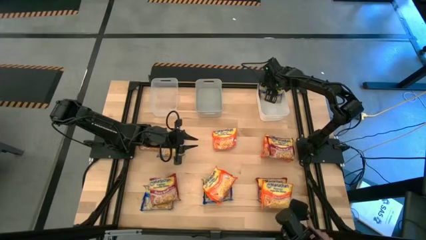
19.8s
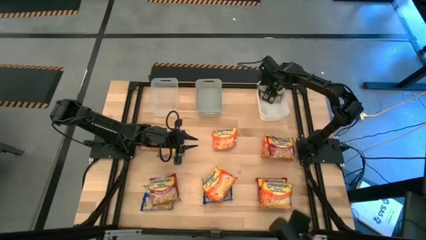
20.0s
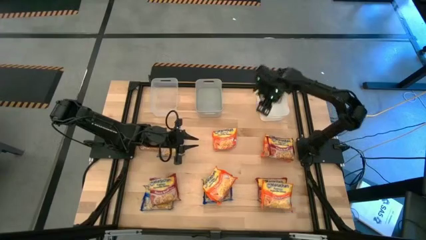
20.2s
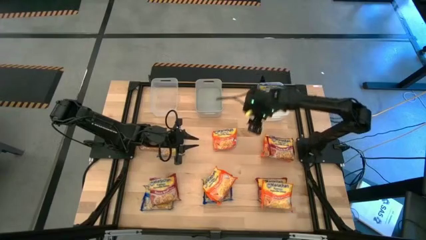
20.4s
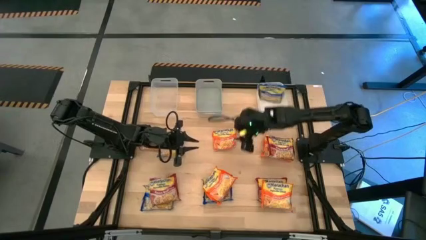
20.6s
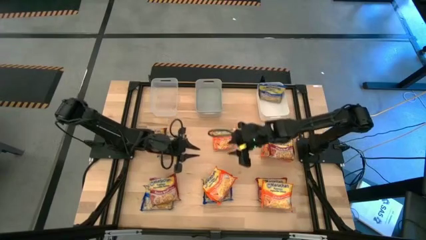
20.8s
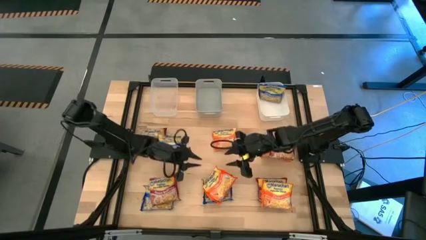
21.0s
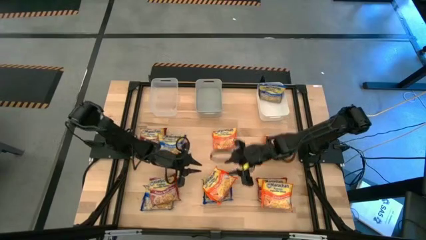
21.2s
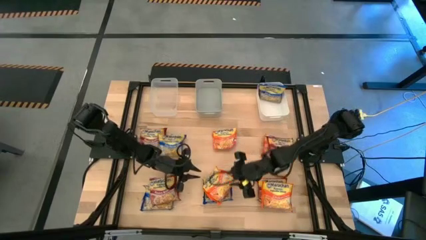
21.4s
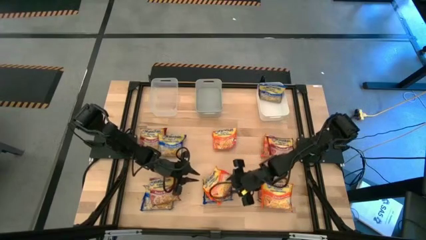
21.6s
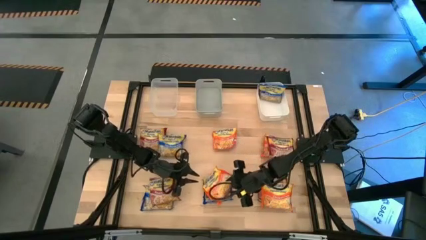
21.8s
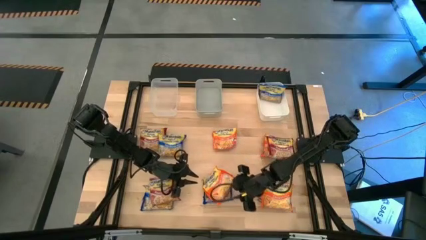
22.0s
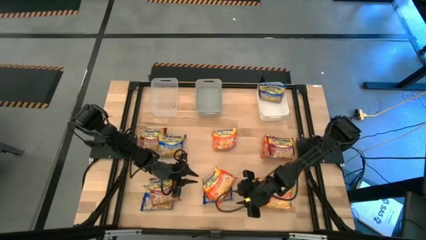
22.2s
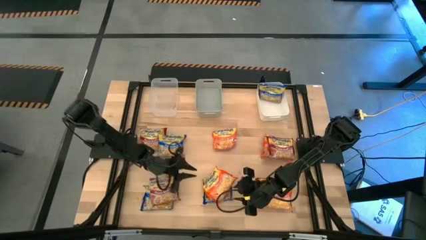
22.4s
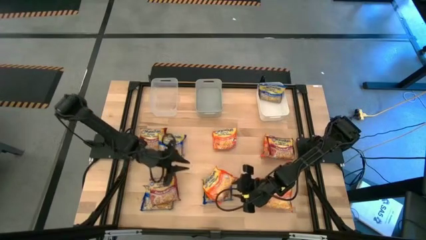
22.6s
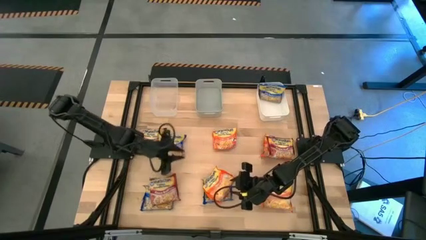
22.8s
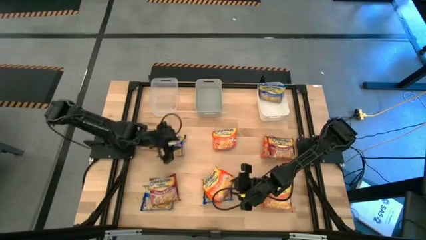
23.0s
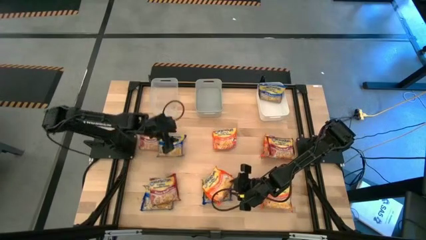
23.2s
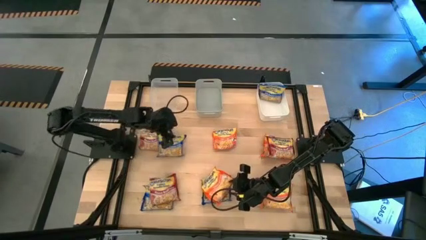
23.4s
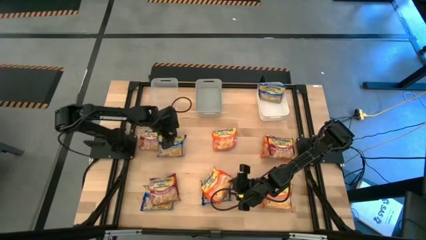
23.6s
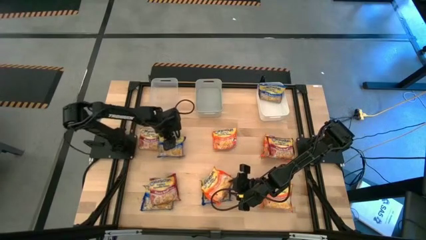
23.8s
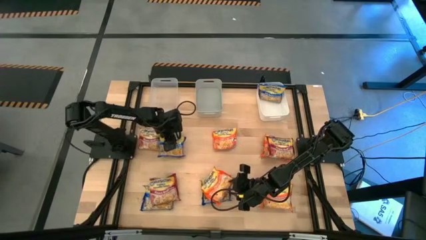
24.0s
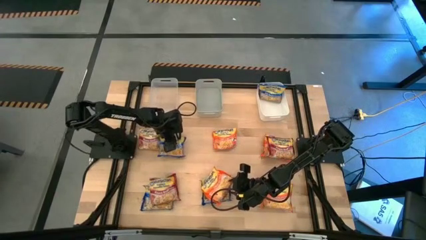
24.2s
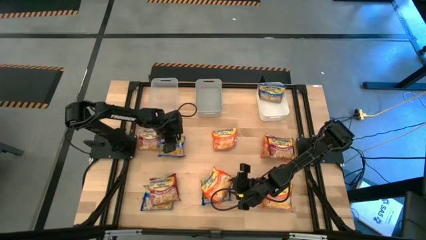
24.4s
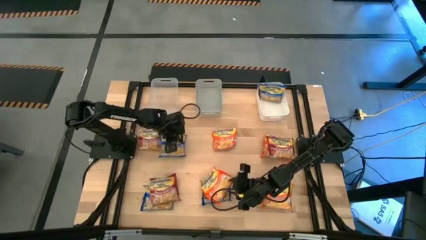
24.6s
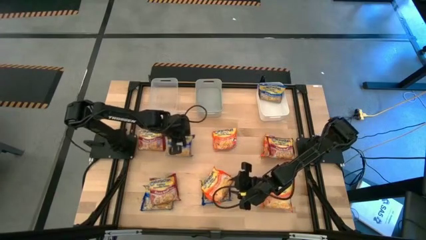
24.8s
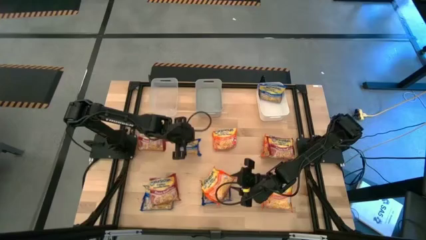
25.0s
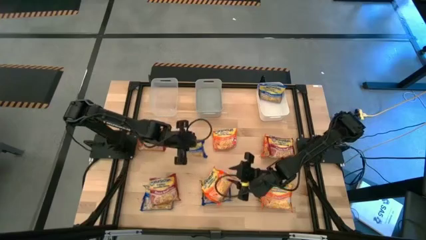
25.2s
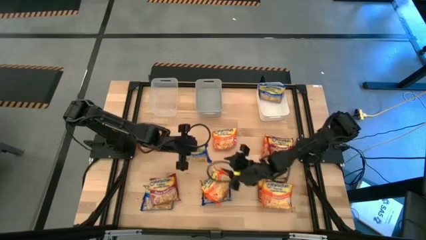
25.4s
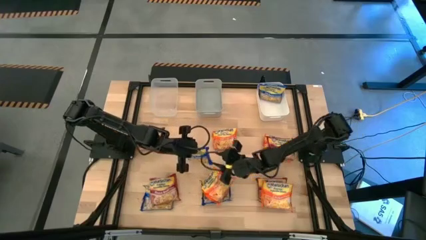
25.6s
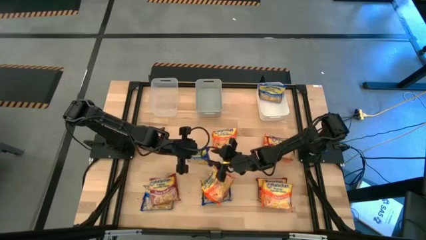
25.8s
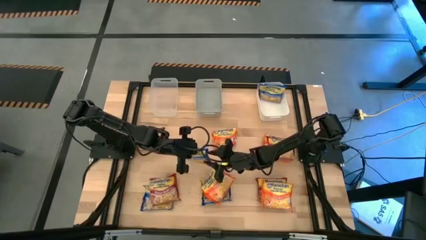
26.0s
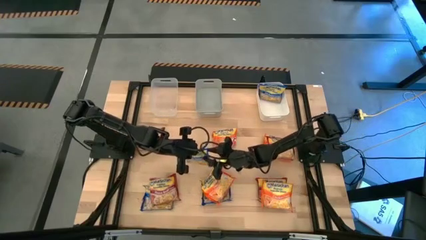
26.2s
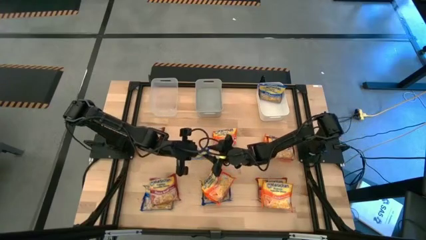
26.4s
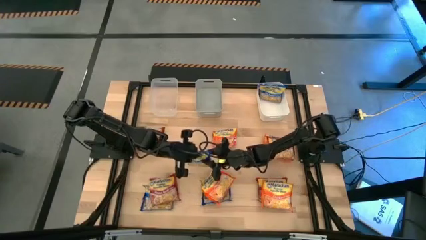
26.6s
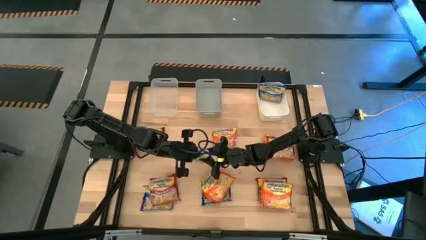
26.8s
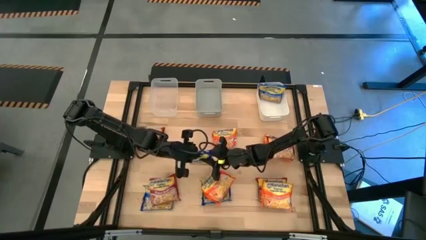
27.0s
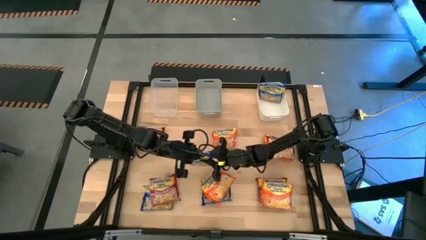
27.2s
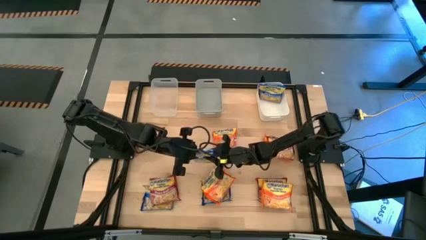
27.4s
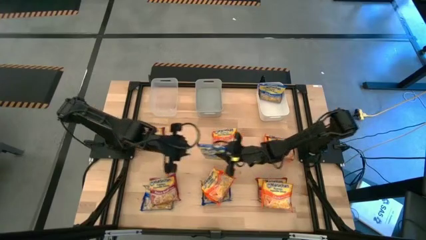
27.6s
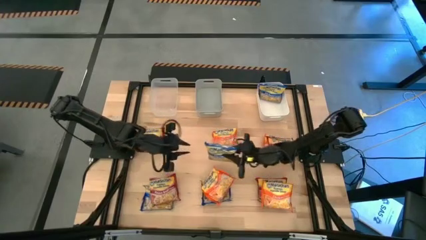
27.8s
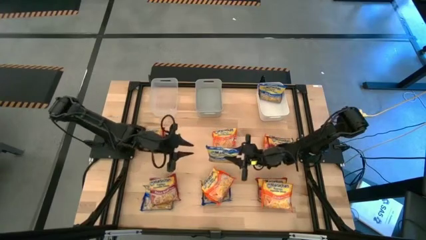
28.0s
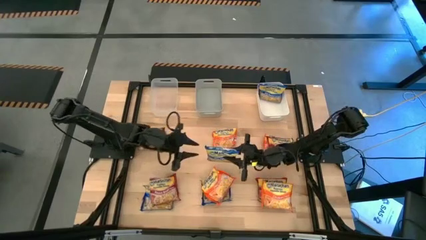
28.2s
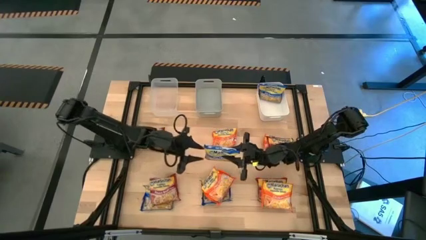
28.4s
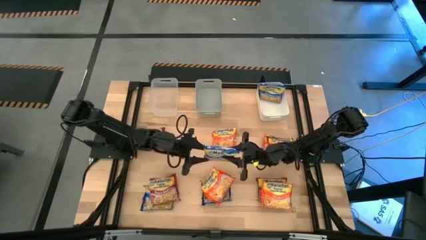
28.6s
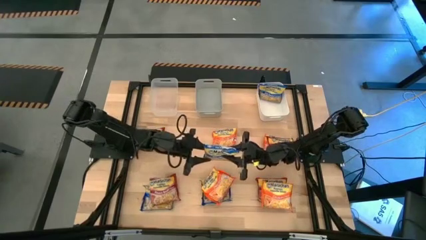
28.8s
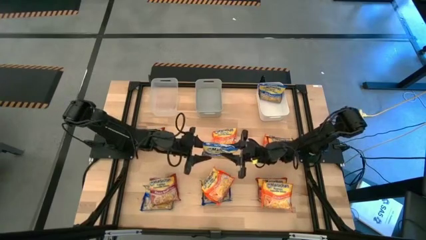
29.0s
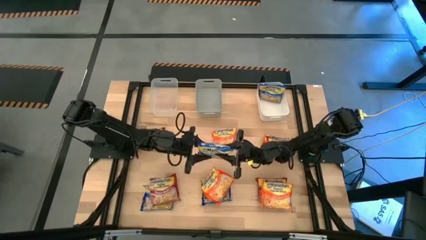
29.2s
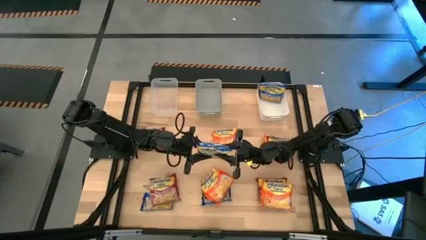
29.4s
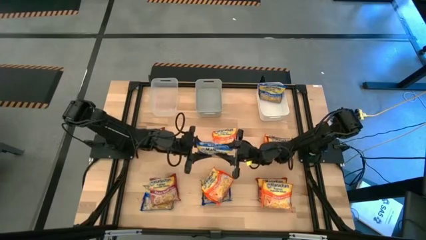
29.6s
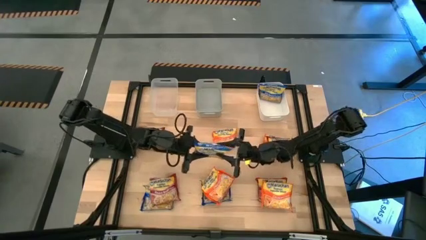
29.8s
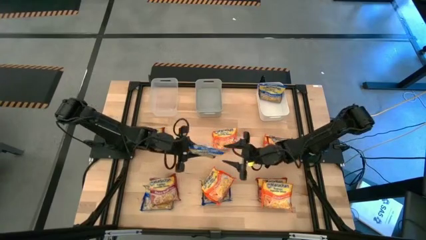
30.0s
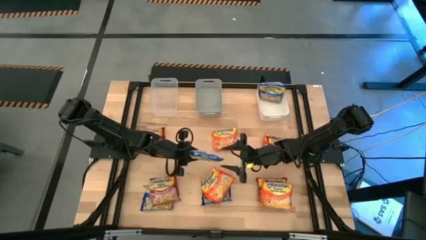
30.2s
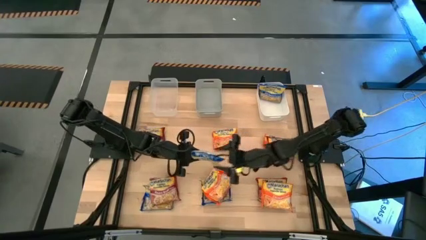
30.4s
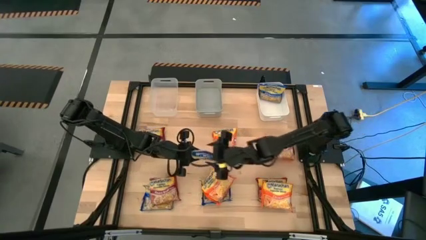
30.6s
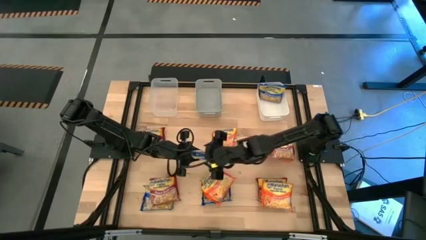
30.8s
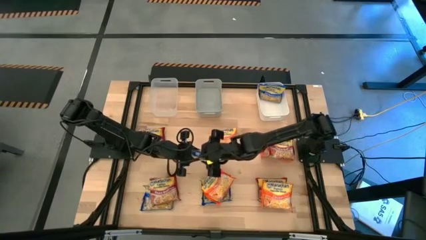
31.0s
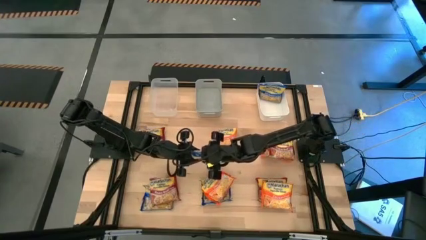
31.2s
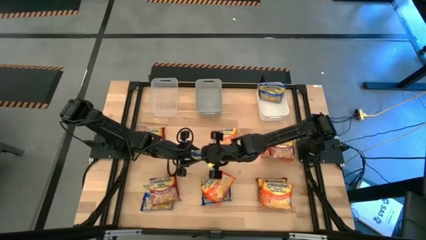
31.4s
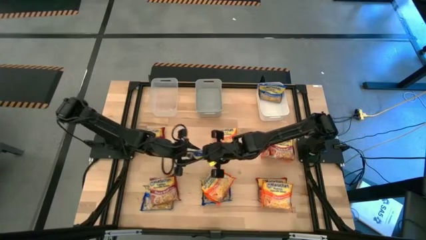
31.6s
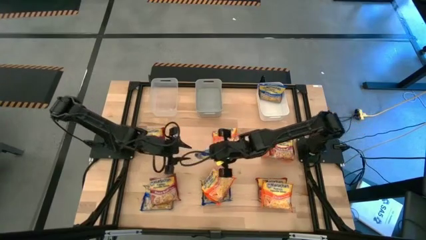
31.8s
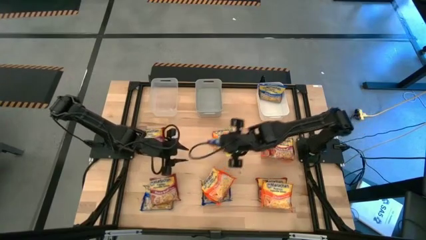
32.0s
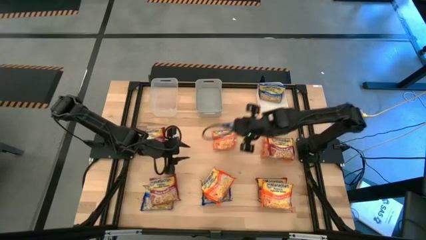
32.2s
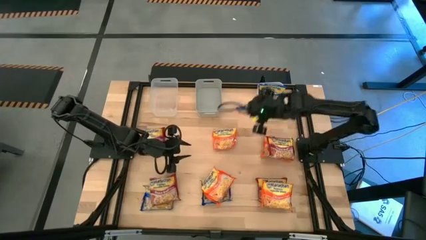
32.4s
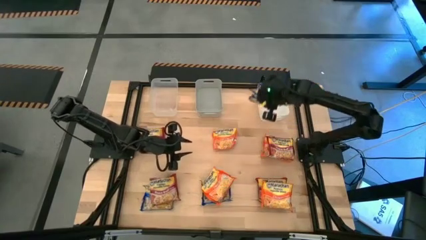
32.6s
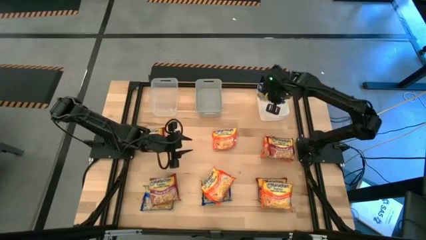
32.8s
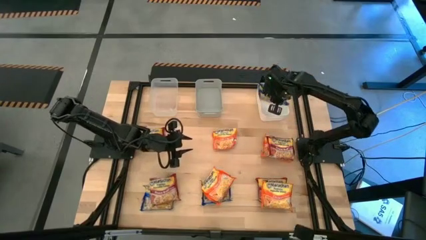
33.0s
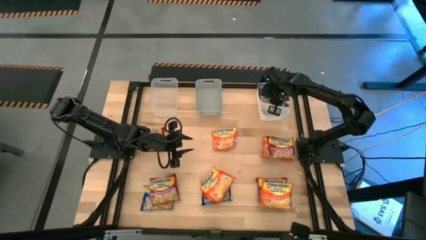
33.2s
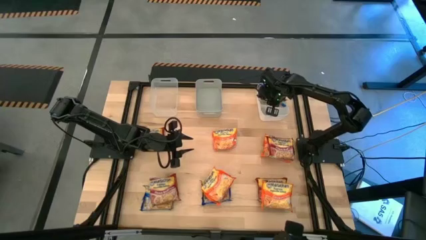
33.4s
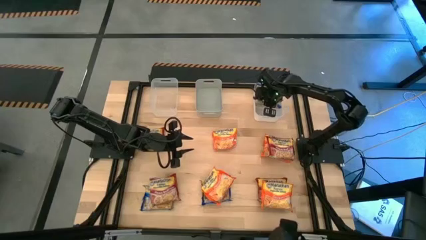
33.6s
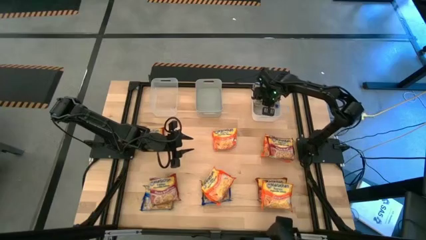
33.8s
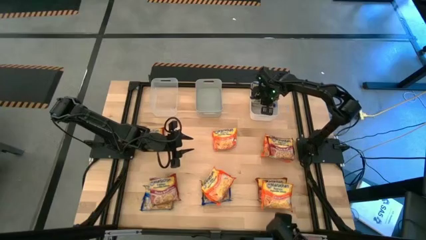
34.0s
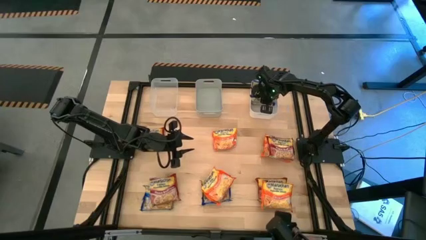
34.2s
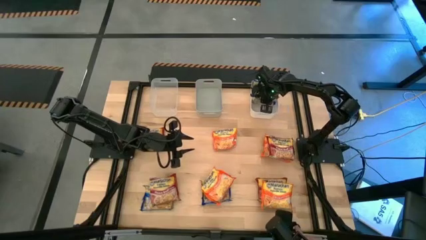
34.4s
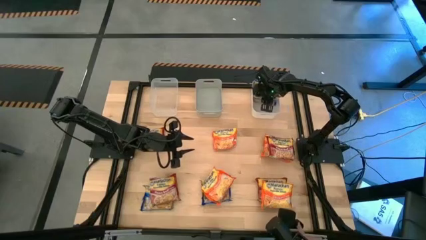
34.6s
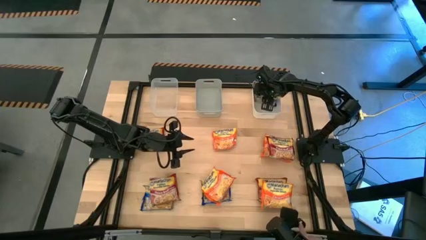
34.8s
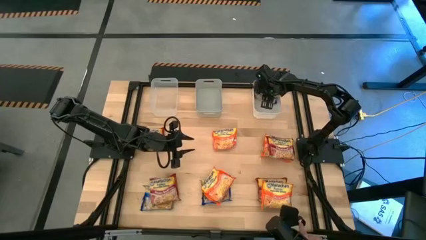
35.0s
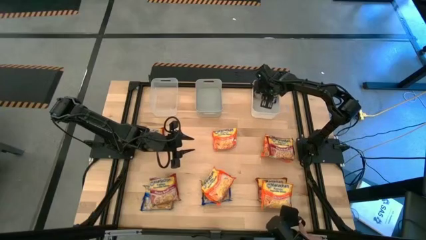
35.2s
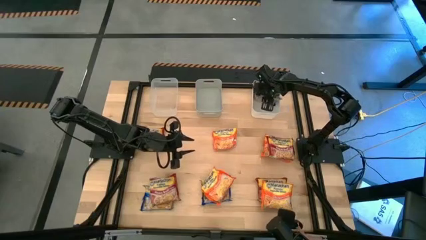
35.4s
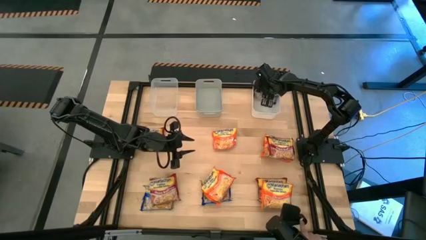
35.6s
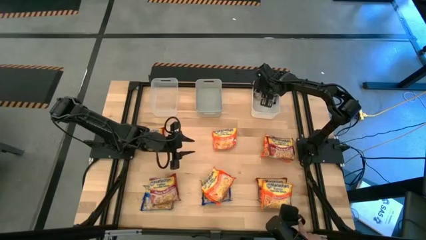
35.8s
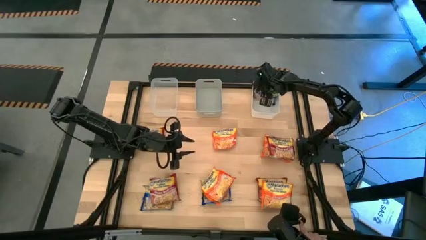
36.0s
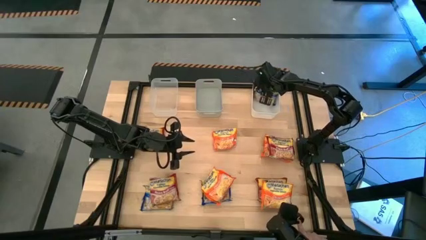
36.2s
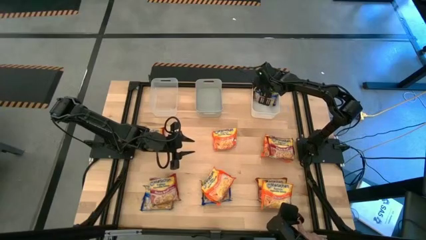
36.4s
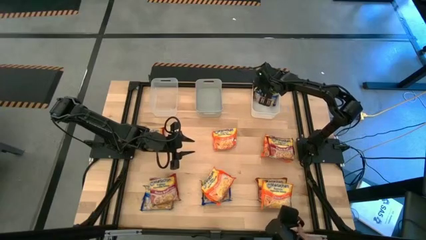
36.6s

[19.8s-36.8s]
Task: Sort Maruchan noodles
Put the blue noodle pack into the white bin

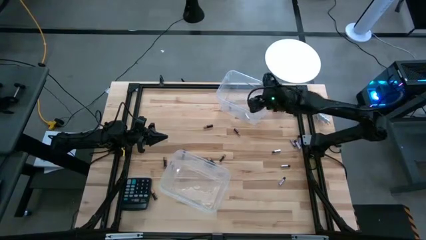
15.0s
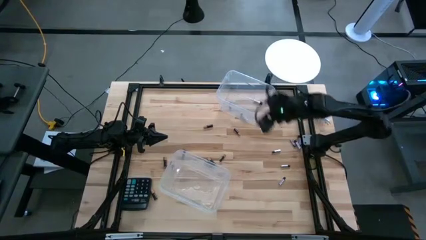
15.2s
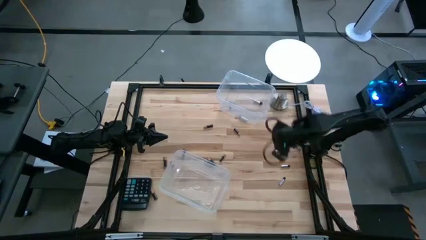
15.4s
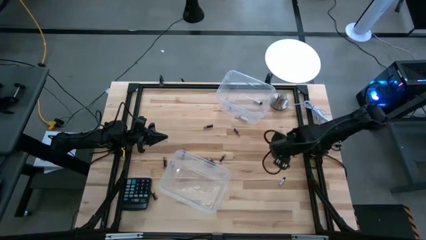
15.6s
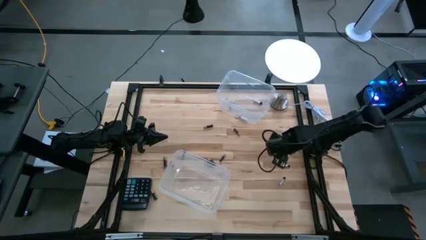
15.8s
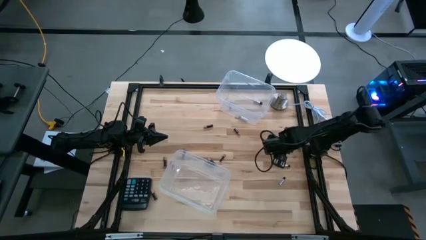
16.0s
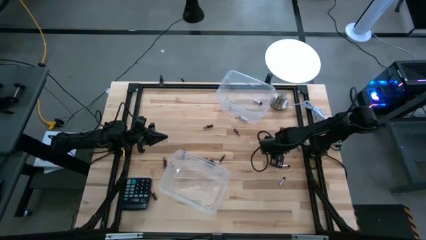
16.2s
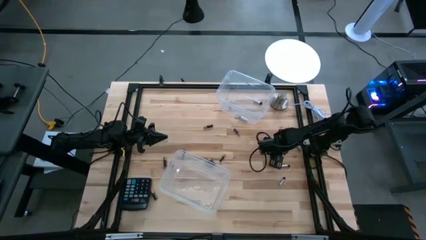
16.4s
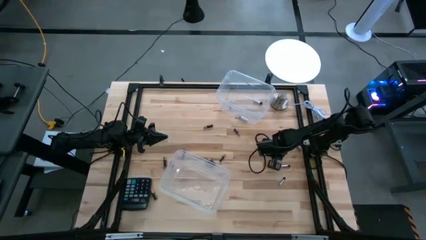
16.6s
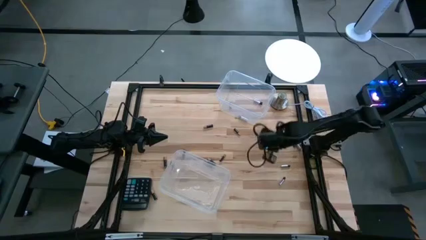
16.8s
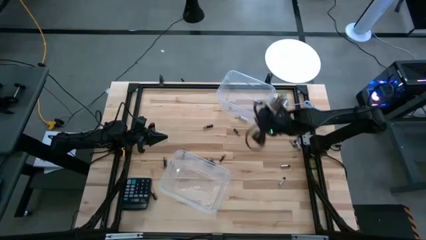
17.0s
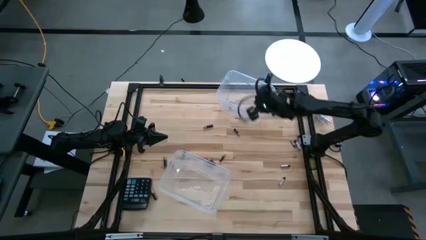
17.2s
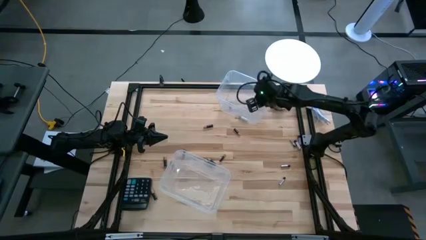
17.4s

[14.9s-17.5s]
Task: Sort batteries
Put the silver battery into the top transparent bin
